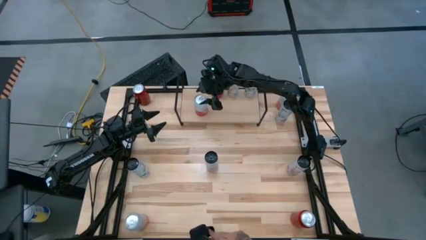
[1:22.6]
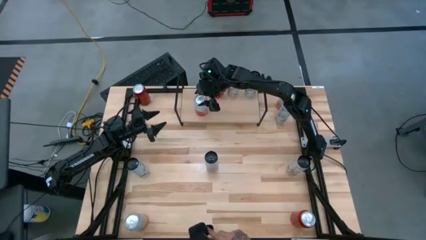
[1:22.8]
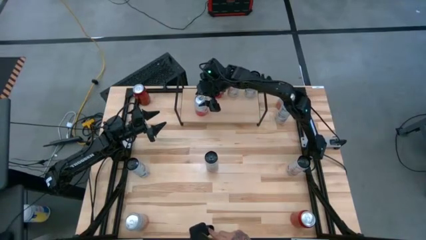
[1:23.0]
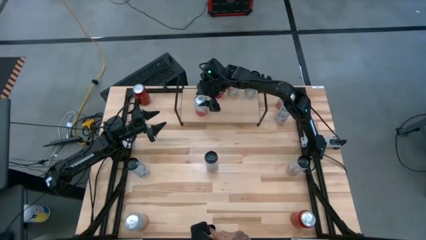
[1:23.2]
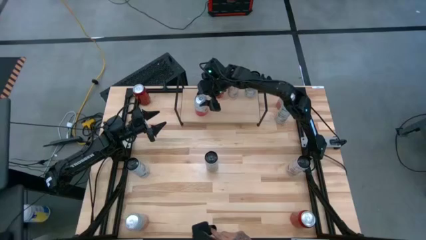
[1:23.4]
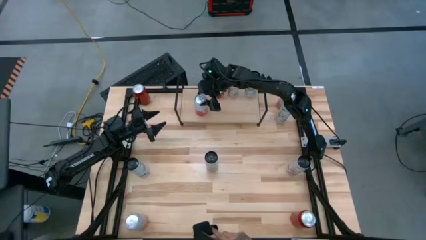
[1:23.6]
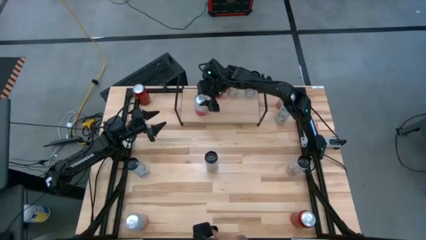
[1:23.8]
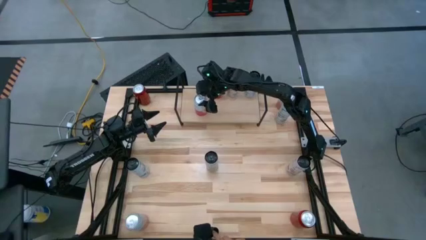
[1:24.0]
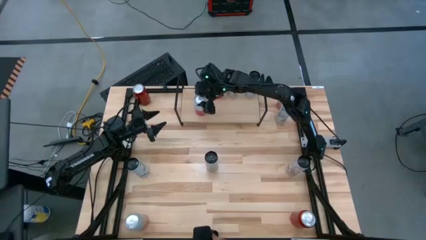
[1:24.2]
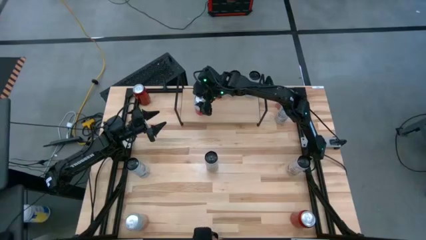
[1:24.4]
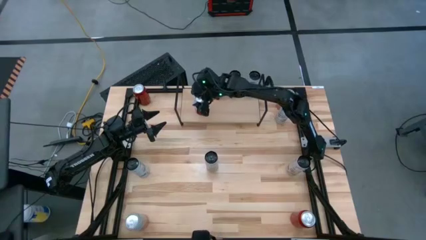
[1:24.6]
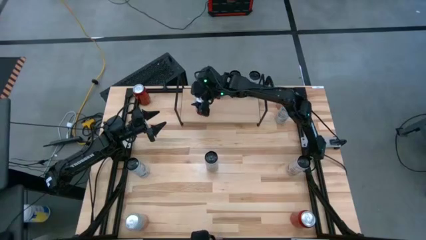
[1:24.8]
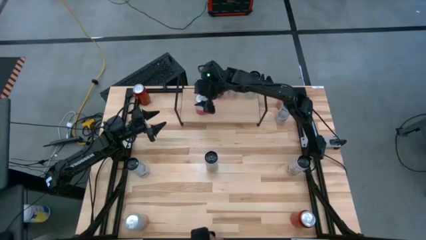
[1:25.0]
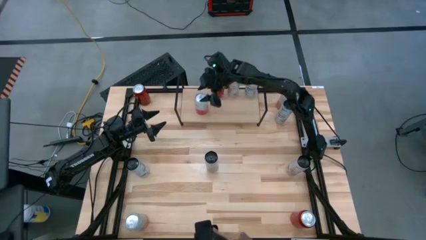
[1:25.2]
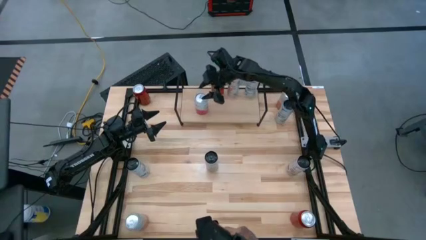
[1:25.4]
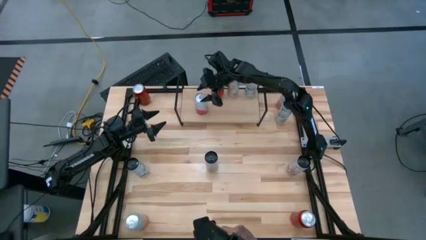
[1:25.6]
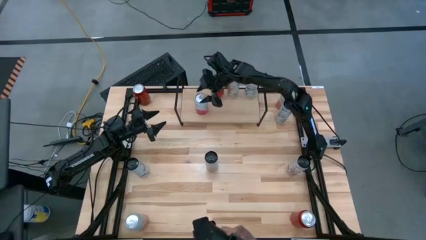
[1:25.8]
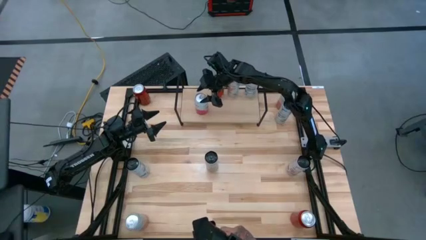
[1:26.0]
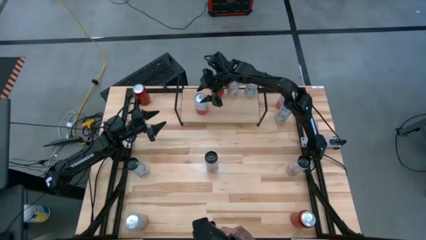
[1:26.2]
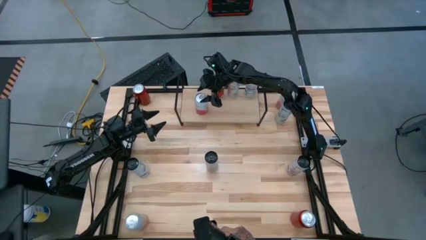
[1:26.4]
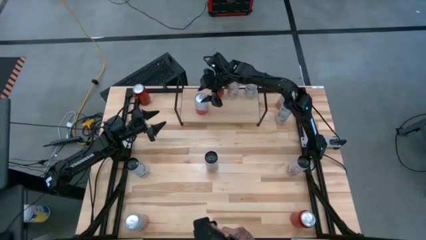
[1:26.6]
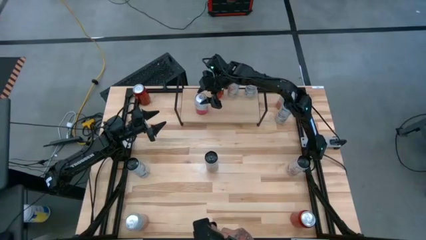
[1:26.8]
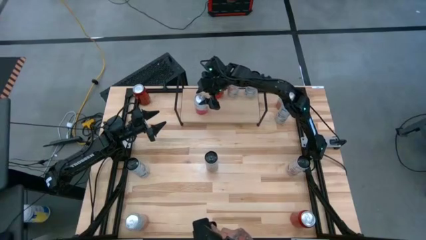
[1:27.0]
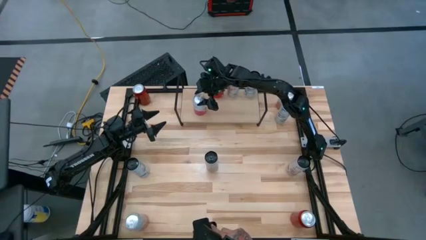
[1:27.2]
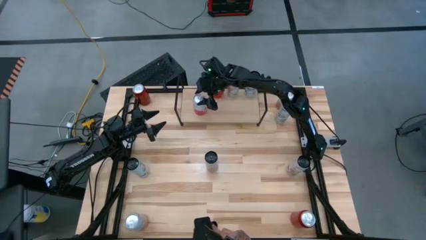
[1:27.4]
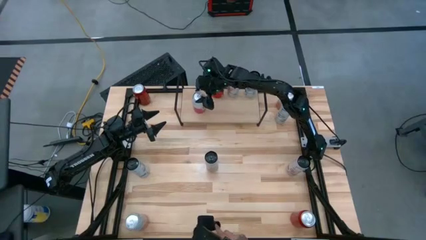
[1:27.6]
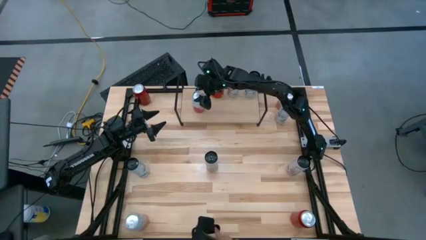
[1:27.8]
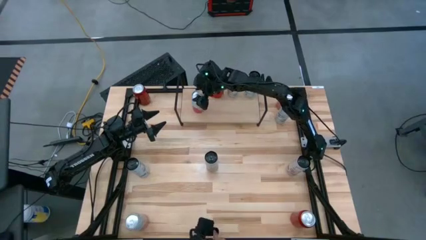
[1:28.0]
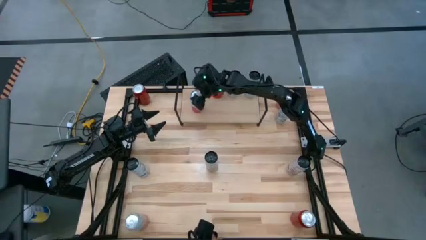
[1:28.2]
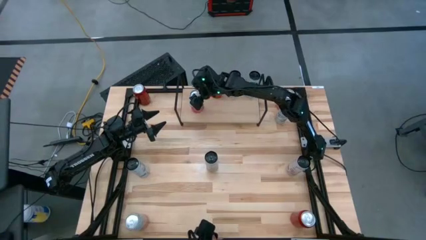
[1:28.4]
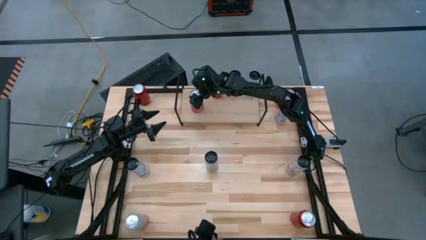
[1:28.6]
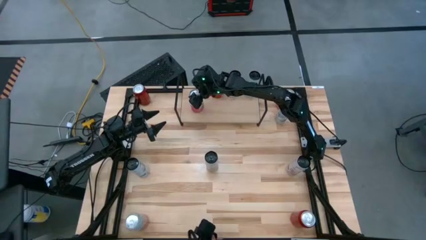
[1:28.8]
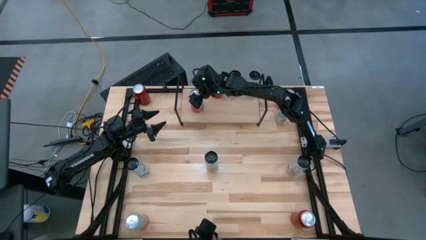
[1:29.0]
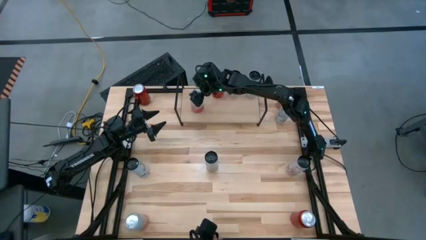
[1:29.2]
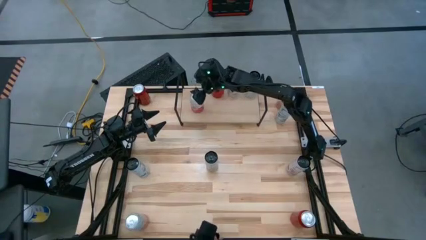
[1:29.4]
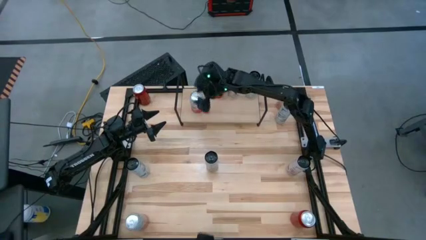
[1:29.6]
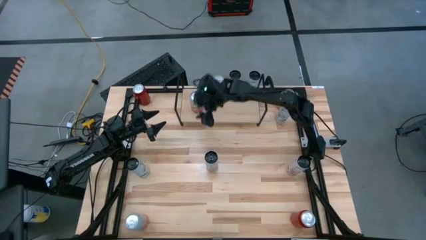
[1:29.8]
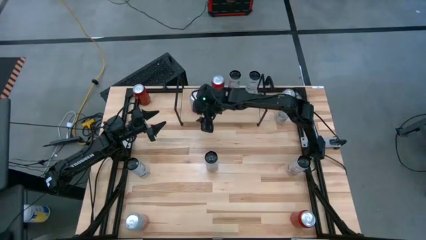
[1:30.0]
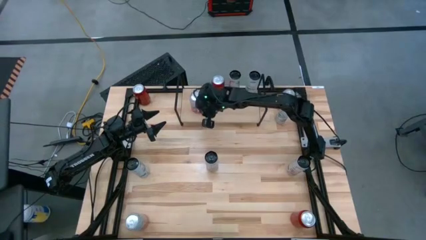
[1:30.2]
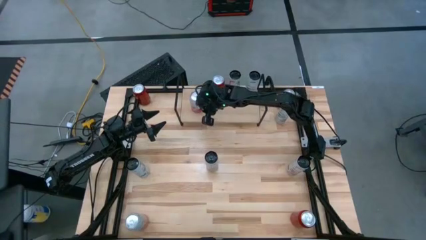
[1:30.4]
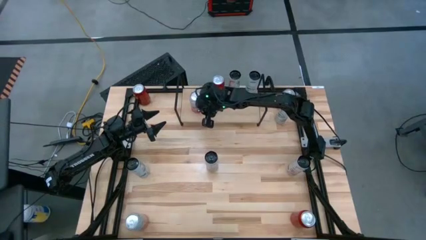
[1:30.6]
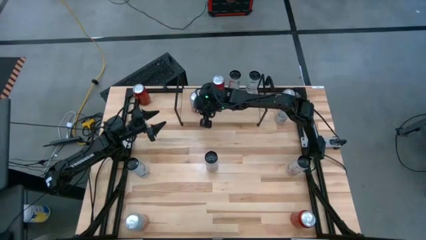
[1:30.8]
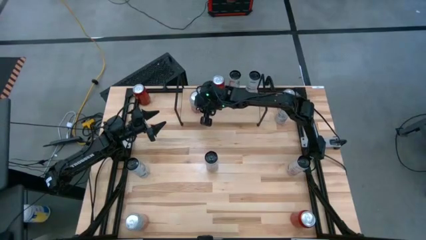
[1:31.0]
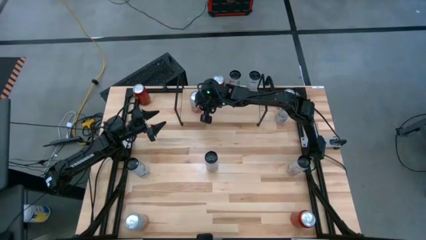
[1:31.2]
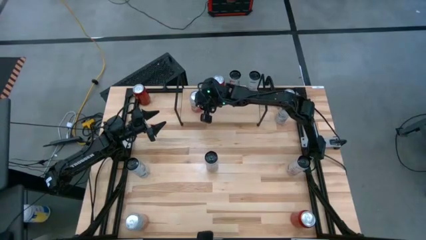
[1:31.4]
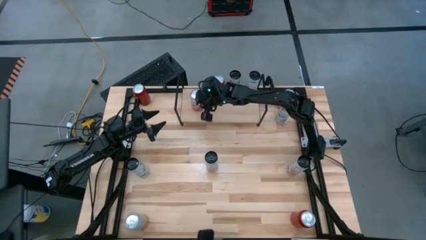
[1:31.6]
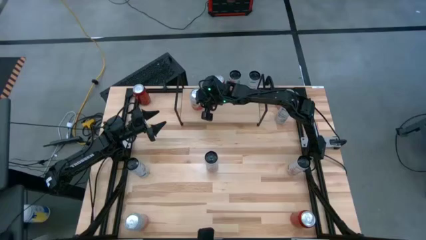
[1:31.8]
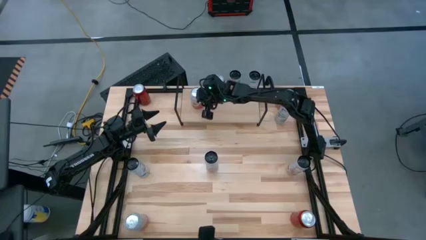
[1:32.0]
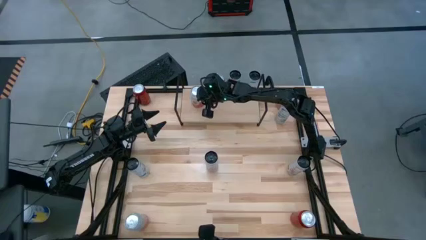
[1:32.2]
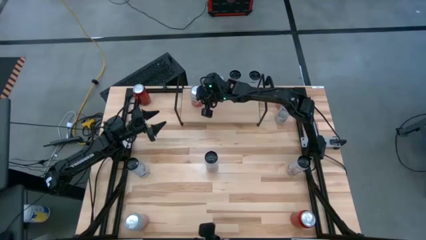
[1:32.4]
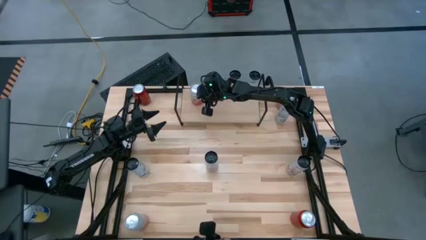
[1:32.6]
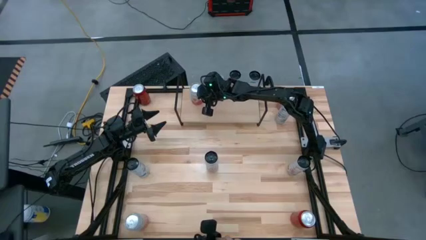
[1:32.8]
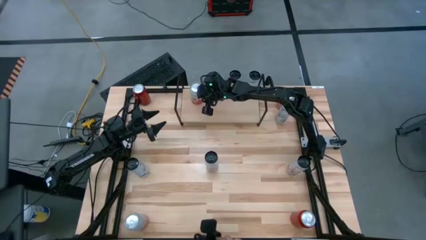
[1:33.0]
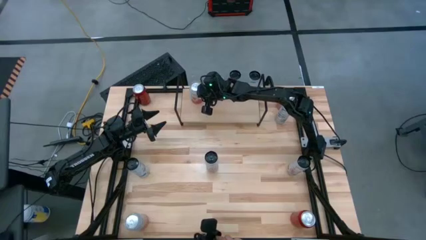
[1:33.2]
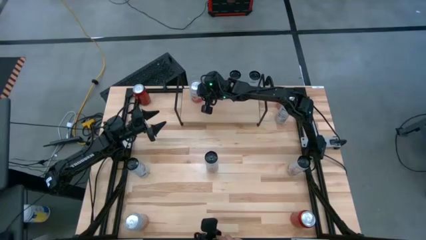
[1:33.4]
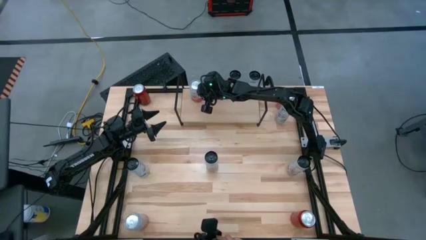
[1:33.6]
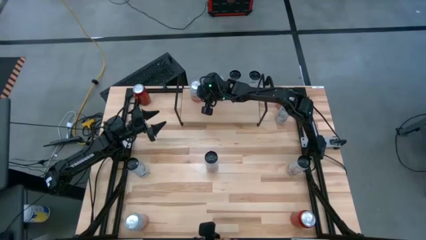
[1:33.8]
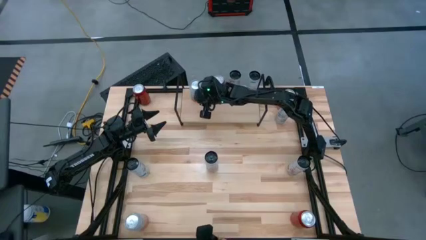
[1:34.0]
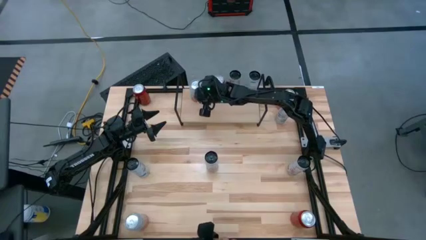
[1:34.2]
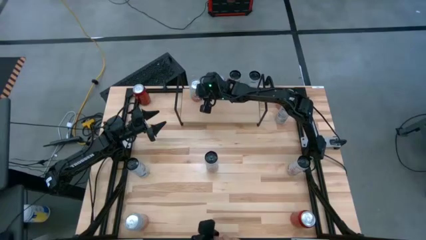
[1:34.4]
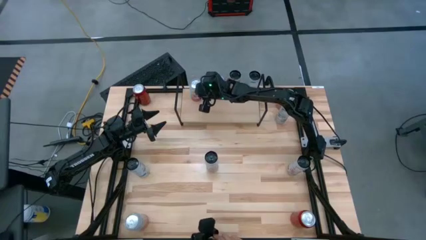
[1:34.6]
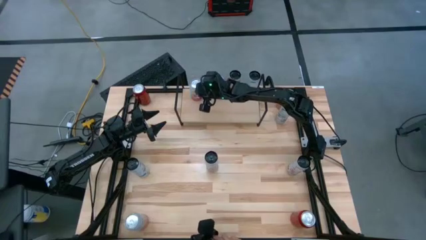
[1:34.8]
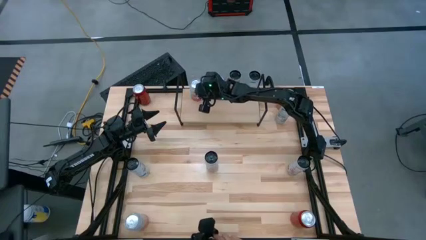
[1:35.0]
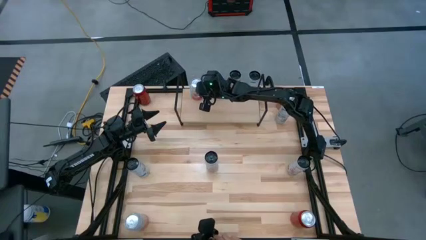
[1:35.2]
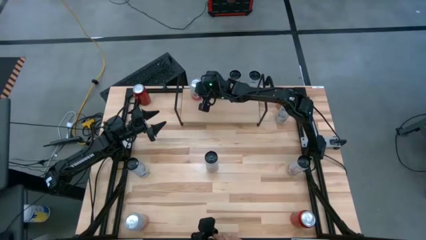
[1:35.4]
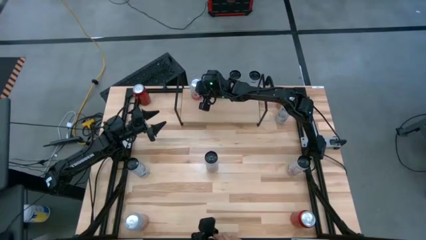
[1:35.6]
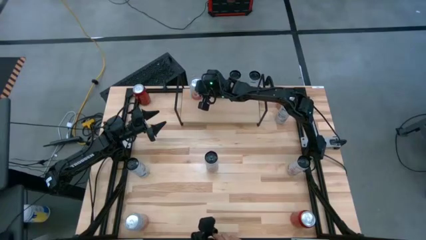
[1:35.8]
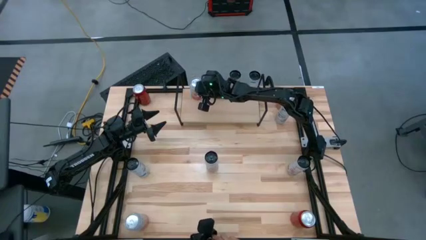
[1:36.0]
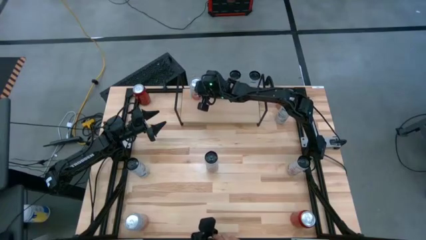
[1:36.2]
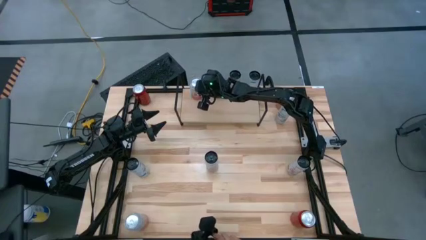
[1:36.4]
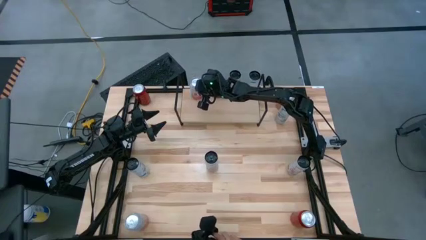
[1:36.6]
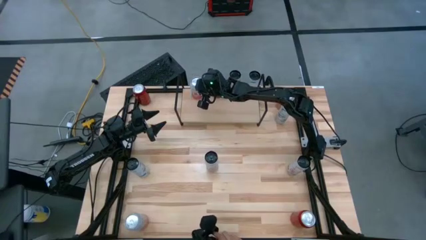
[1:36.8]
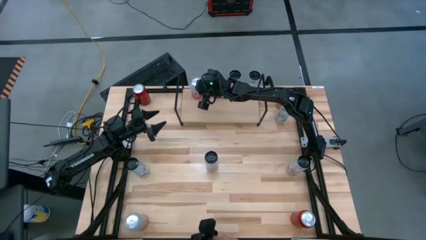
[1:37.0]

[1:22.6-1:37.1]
Task: Place canned beverage on shelf
Put the pink white soda can on the shelf

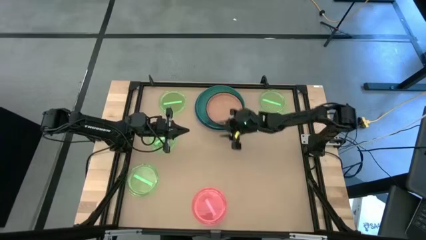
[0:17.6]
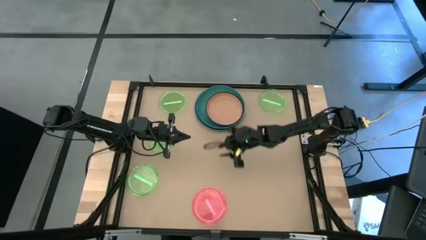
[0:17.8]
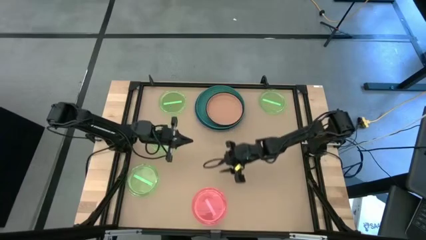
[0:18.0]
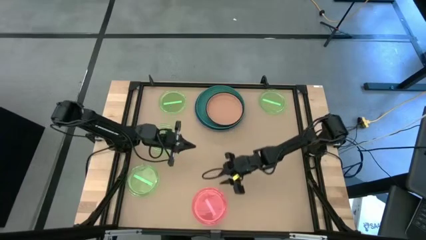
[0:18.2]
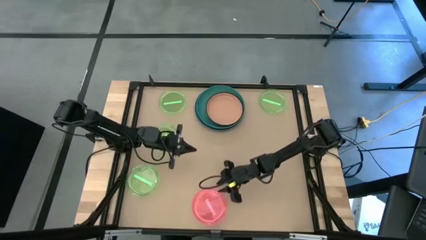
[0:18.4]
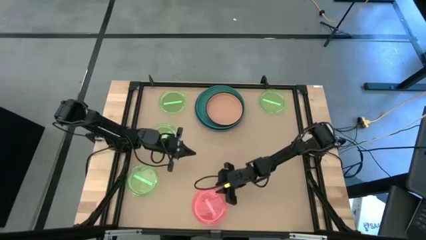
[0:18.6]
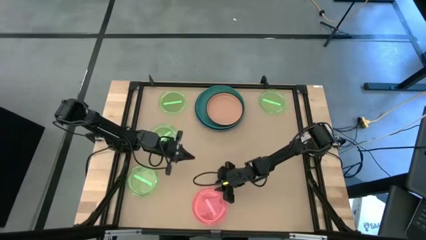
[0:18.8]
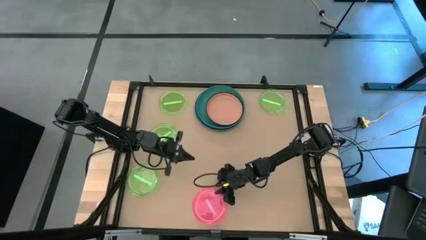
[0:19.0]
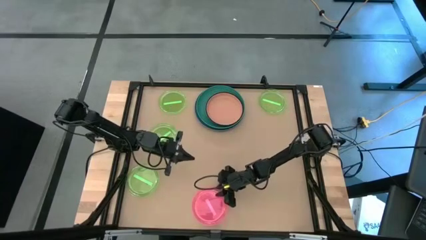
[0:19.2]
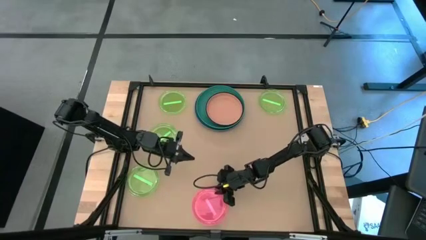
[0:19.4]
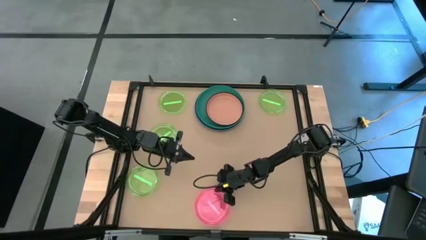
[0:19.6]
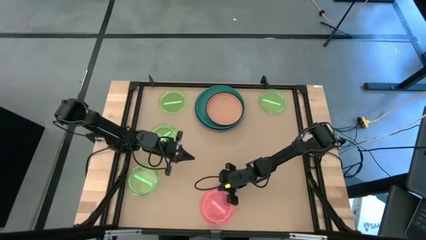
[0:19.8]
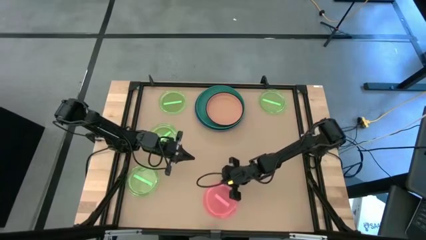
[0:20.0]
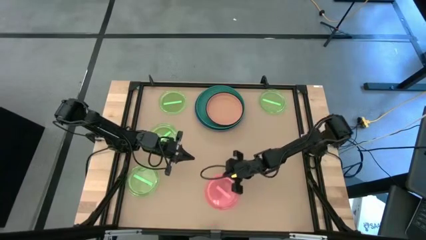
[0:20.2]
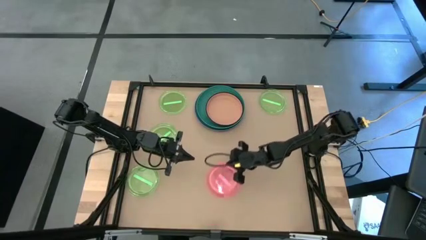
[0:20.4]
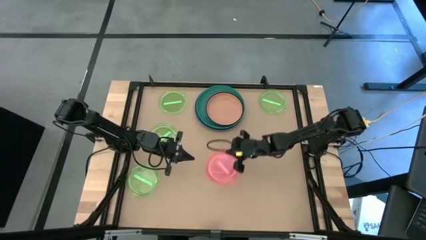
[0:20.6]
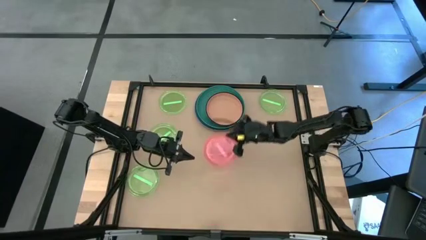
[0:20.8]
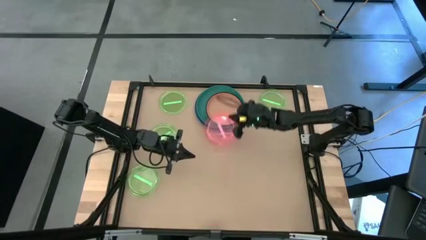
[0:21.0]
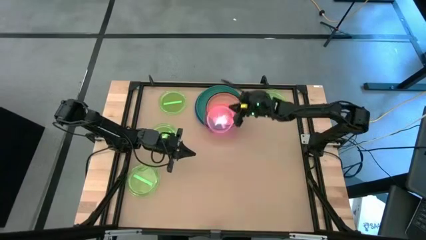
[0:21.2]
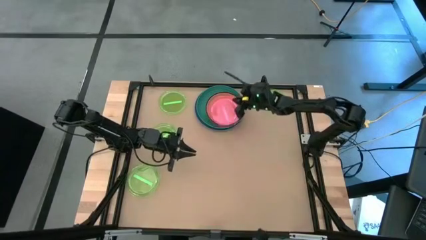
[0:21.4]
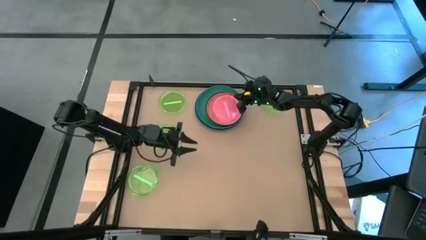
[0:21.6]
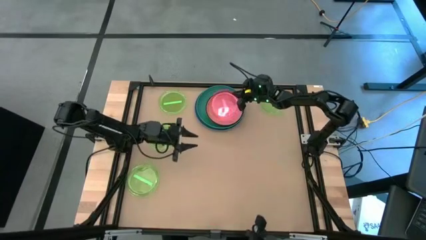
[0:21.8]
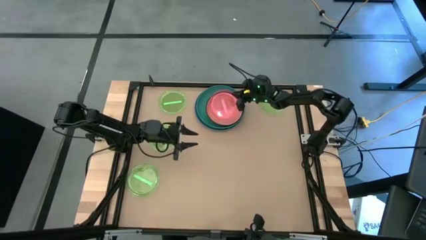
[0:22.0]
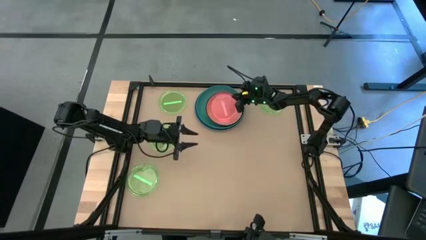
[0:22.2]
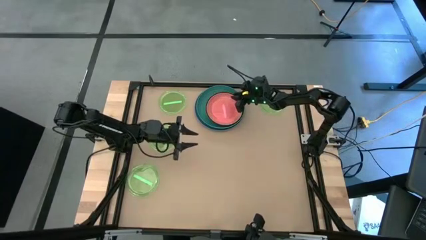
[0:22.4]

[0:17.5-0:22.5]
Task: Stack plastic plates
Stack the pink transparent plate on top of the orange plate
